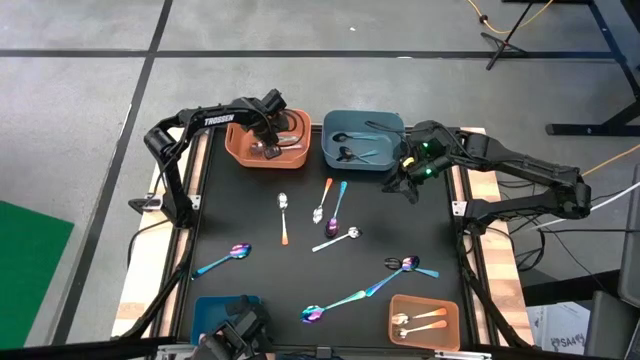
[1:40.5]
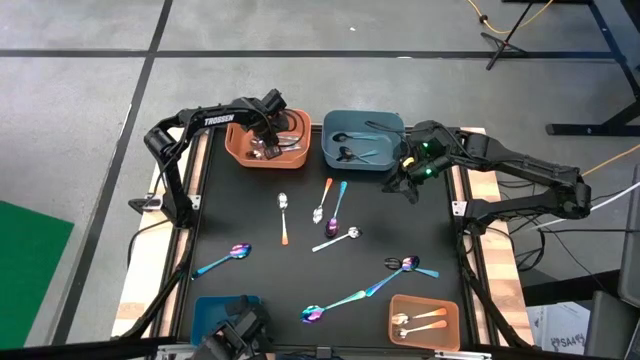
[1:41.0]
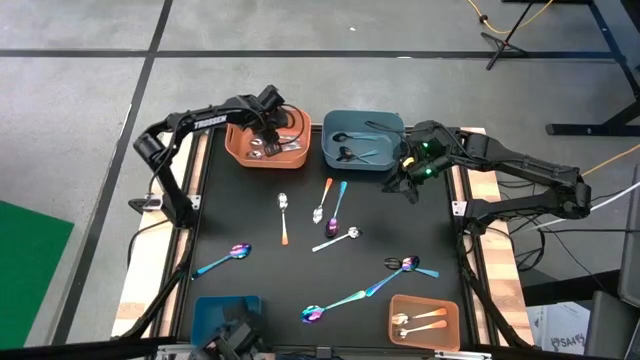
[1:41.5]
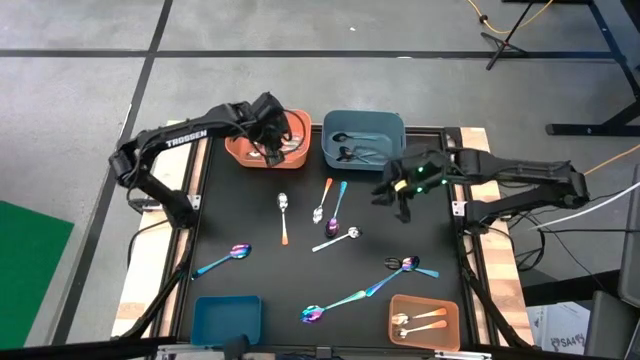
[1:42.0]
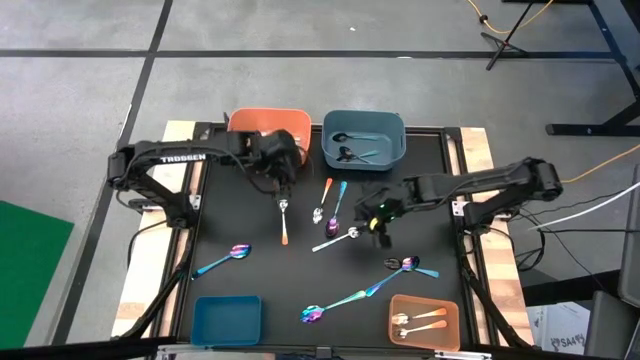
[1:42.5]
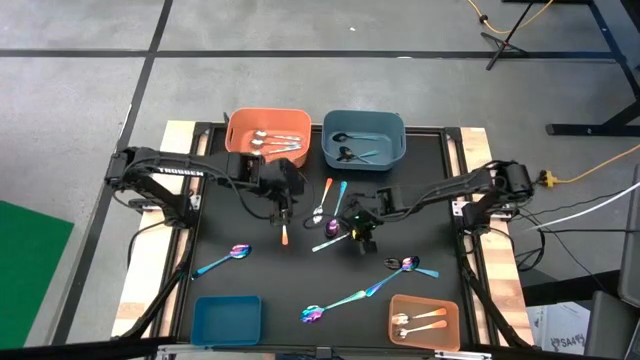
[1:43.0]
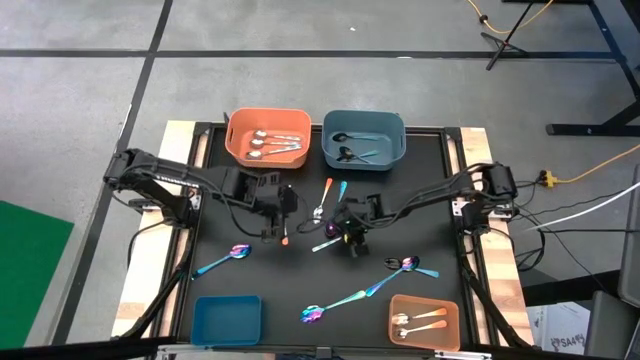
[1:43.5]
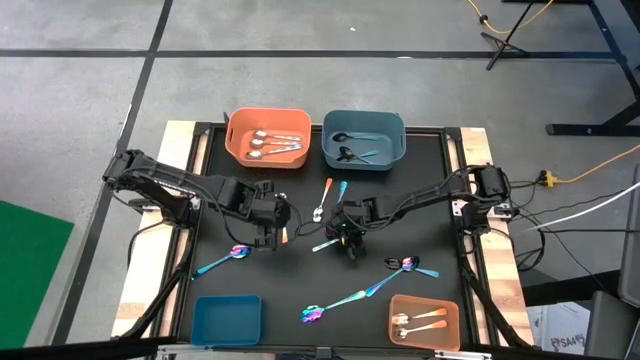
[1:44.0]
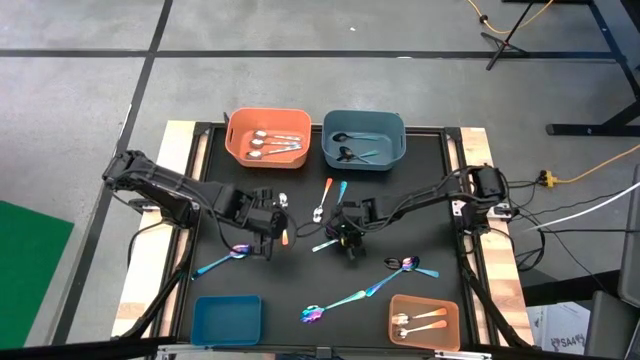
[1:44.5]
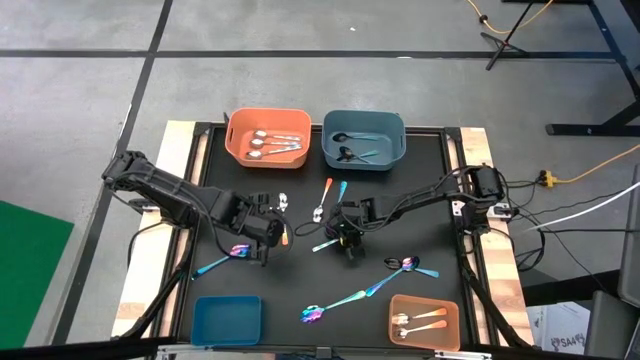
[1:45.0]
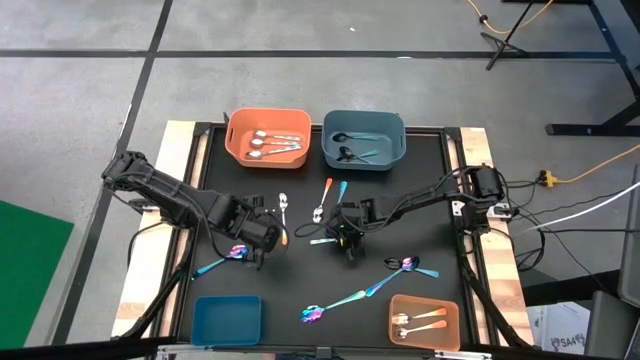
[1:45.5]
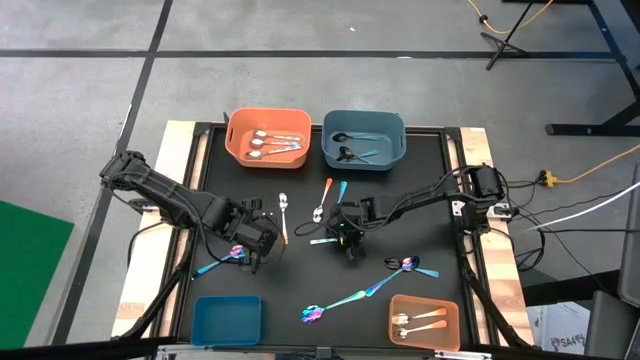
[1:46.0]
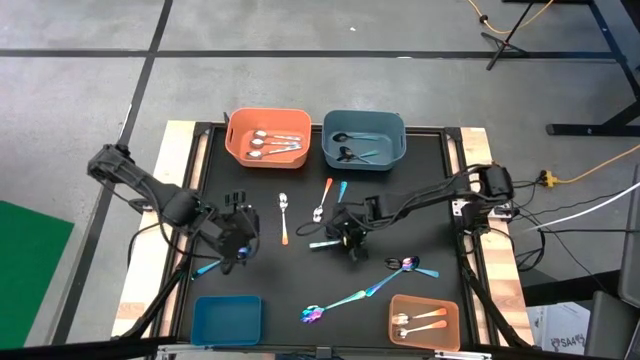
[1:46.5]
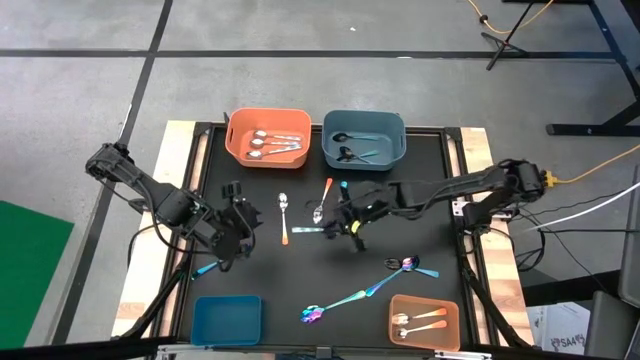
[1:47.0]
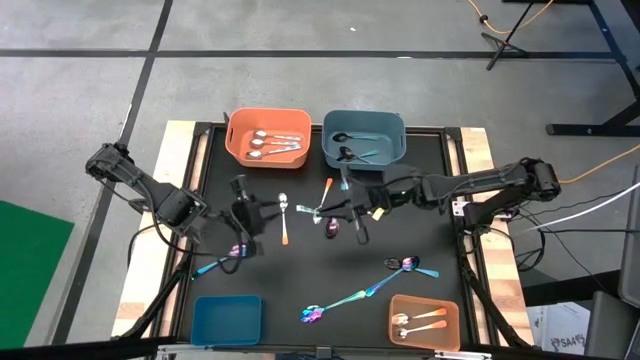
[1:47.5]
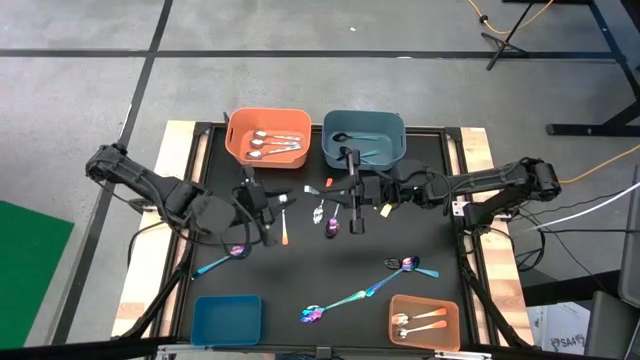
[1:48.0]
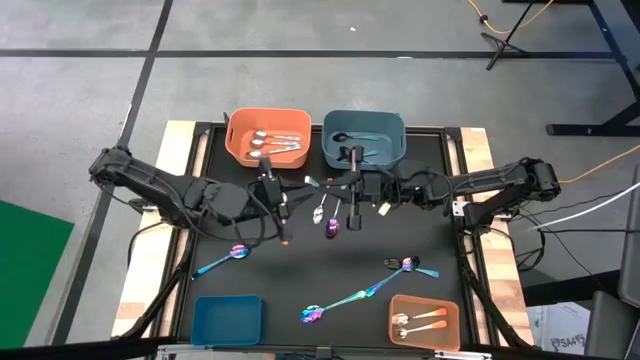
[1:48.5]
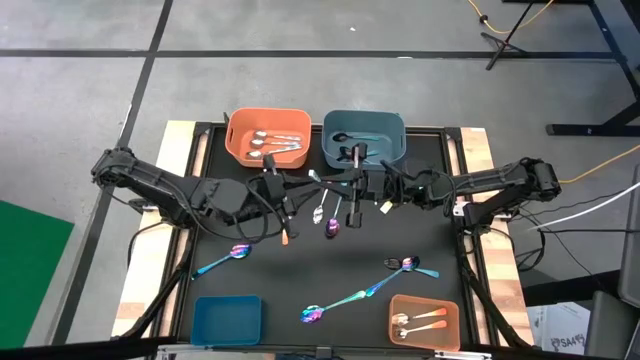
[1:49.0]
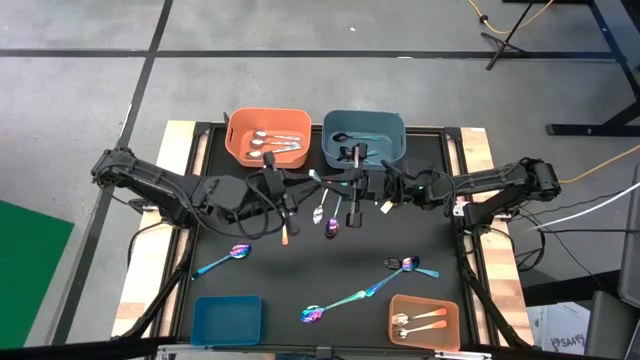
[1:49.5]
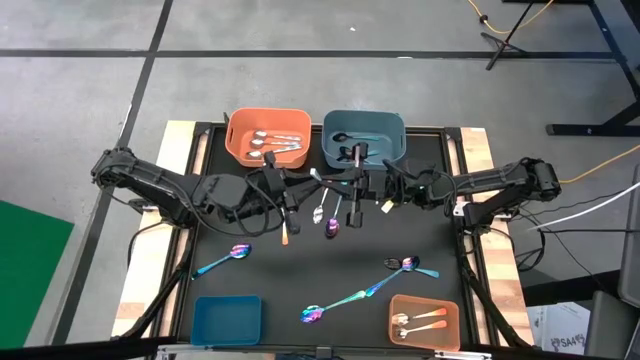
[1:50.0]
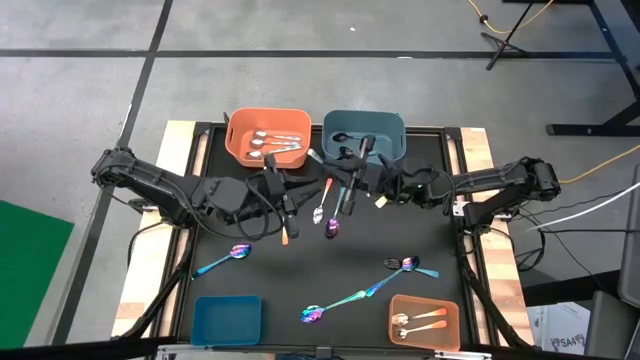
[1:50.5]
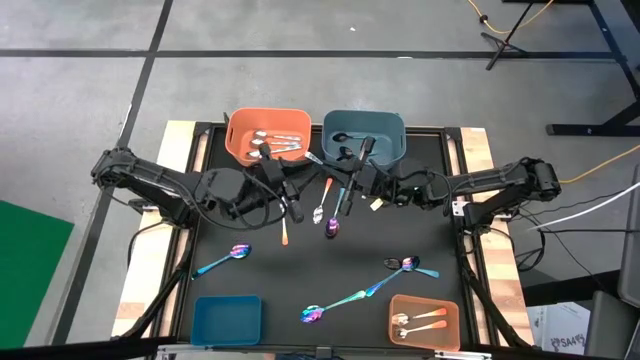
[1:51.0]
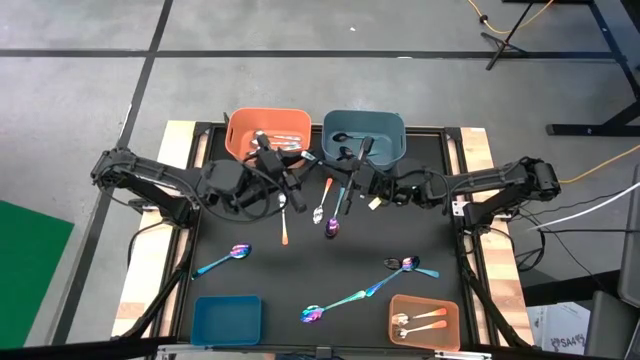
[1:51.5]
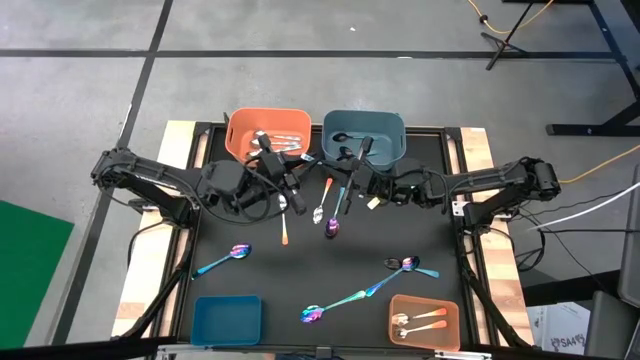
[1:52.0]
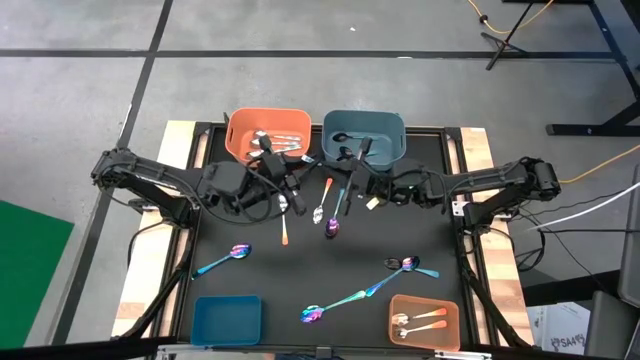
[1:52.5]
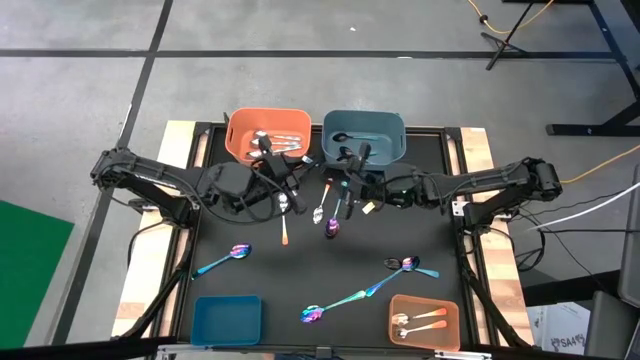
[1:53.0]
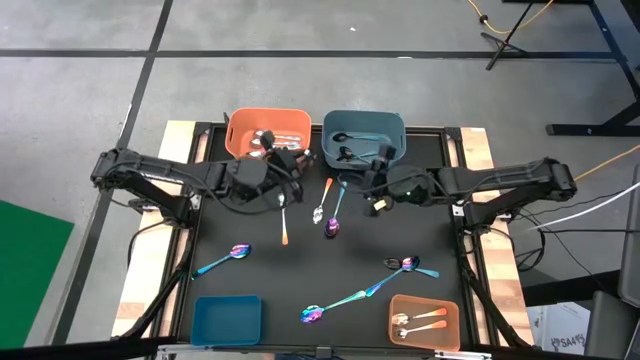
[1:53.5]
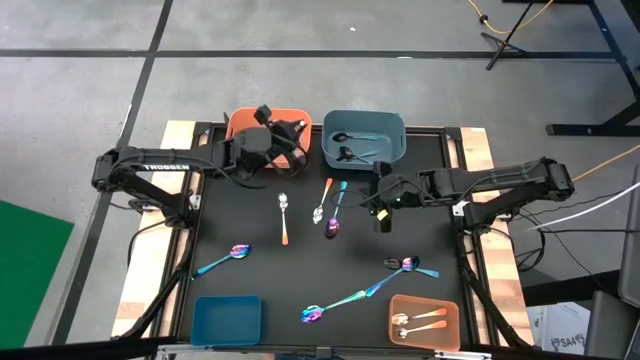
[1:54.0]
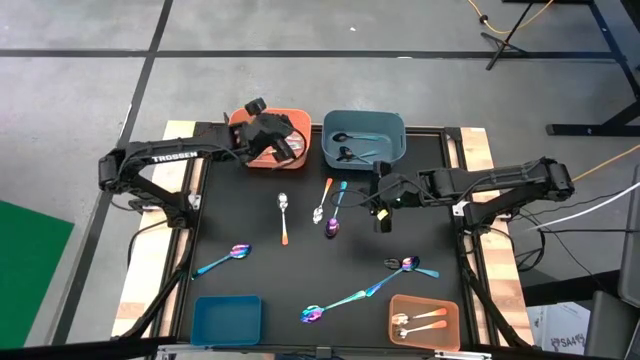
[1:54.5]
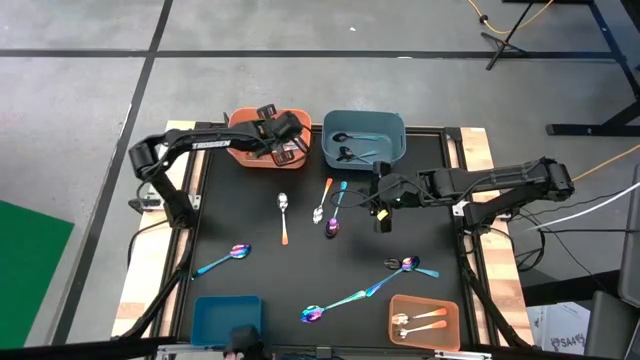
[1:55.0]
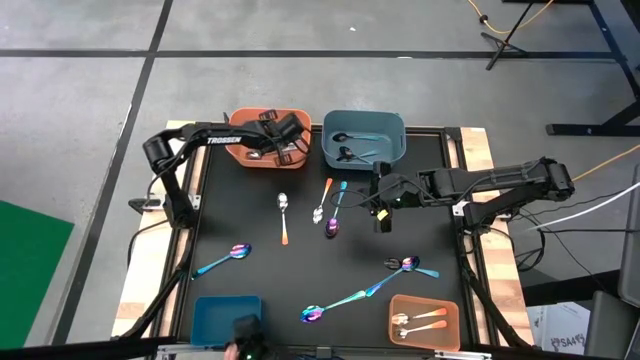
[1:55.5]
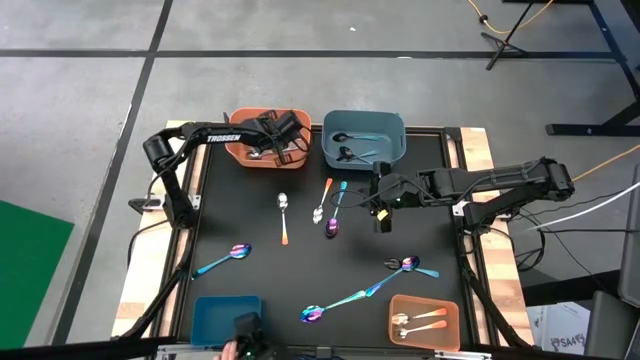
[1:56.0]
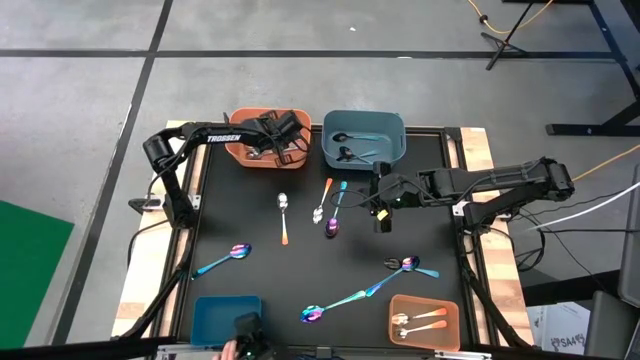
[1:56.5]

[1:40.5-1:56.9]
Task: Sort silverware by color (type)
Put the white patterned spoon into the top orange bin

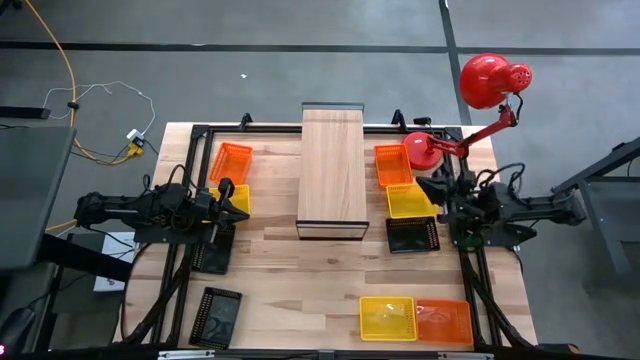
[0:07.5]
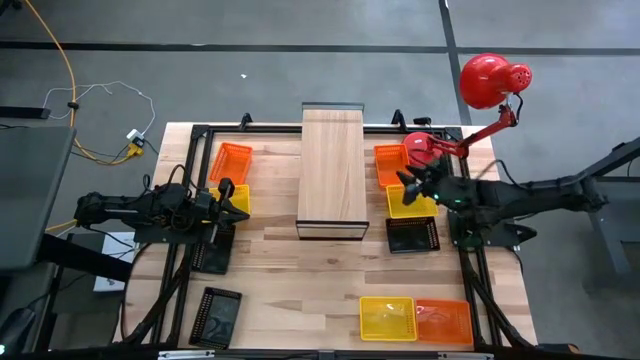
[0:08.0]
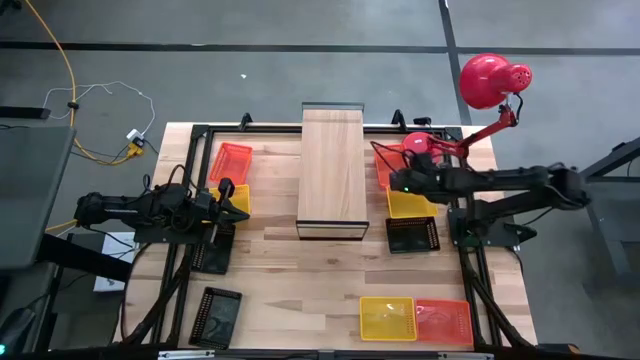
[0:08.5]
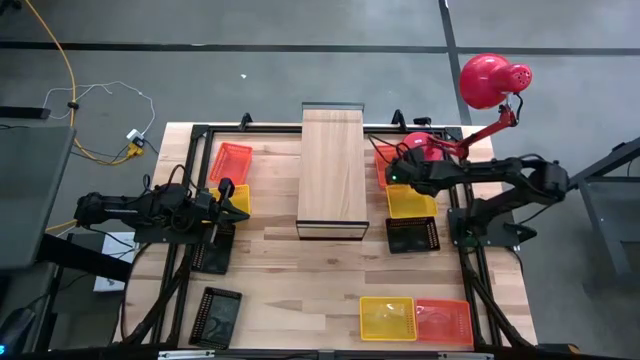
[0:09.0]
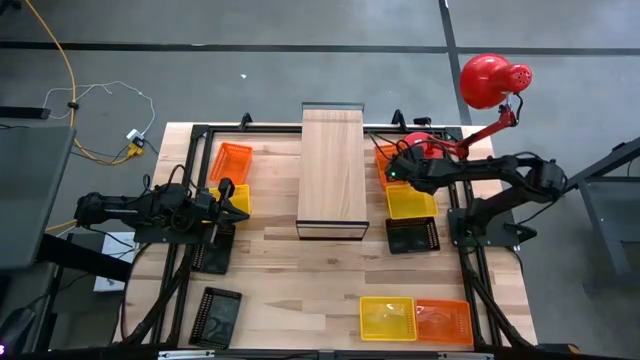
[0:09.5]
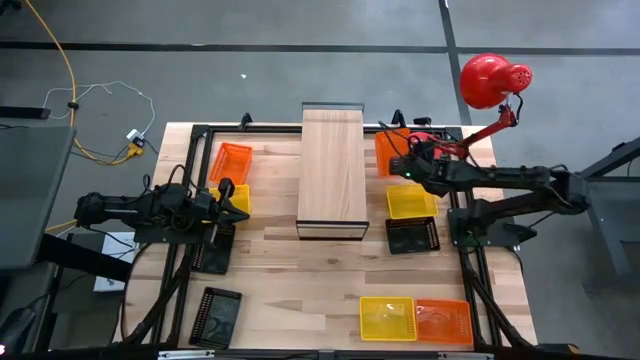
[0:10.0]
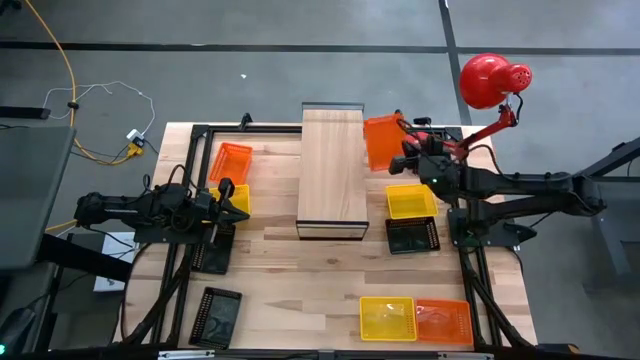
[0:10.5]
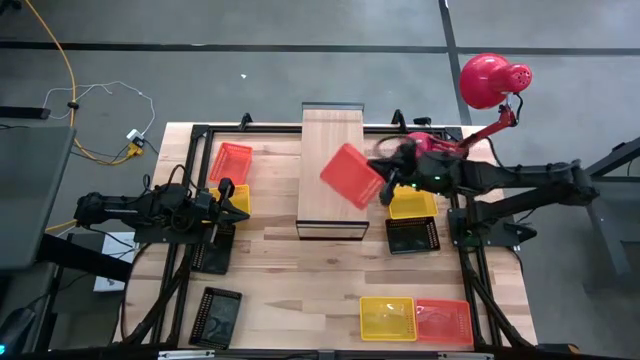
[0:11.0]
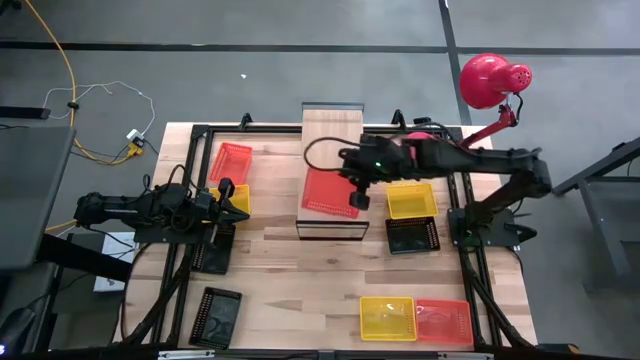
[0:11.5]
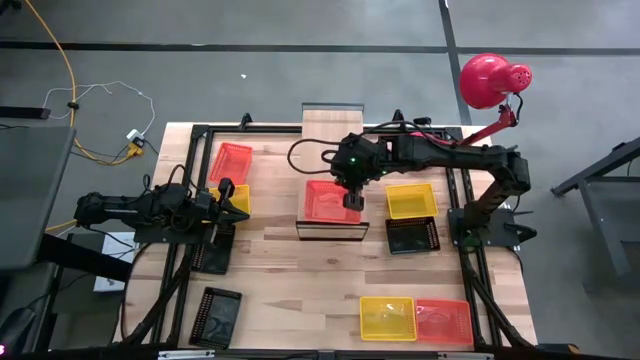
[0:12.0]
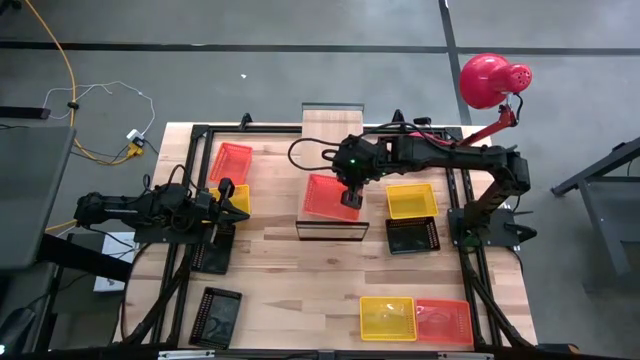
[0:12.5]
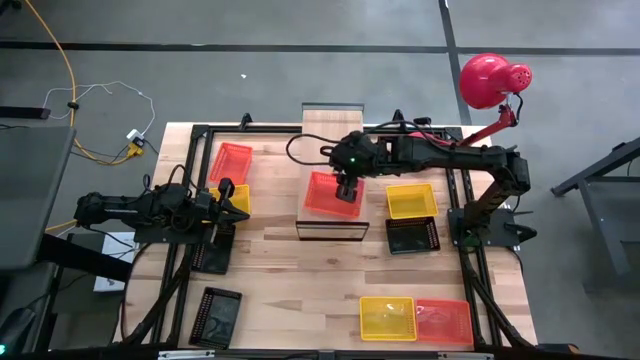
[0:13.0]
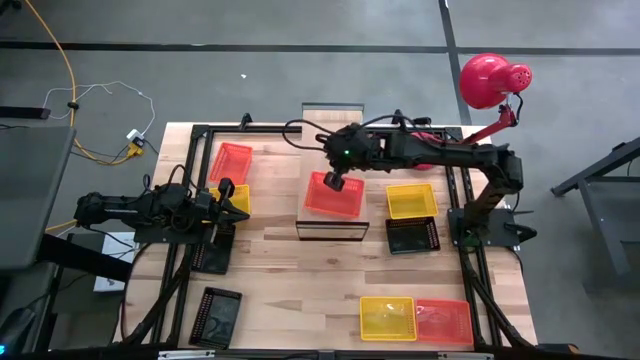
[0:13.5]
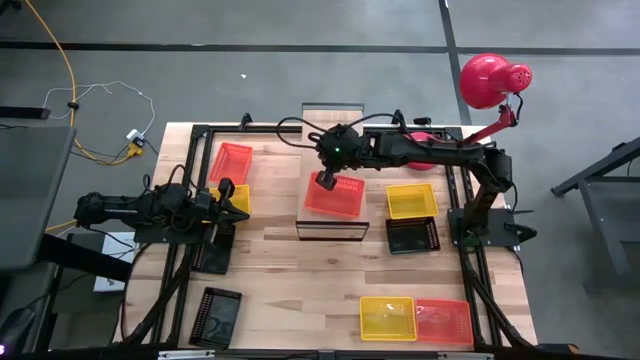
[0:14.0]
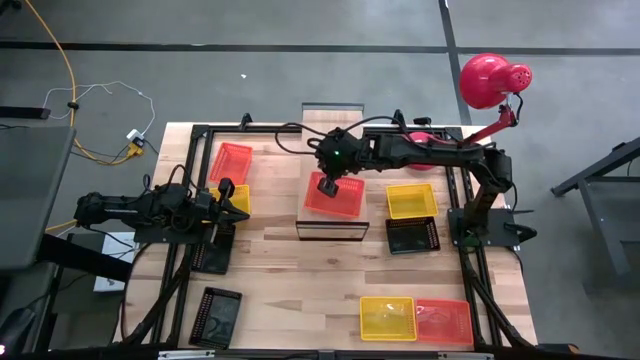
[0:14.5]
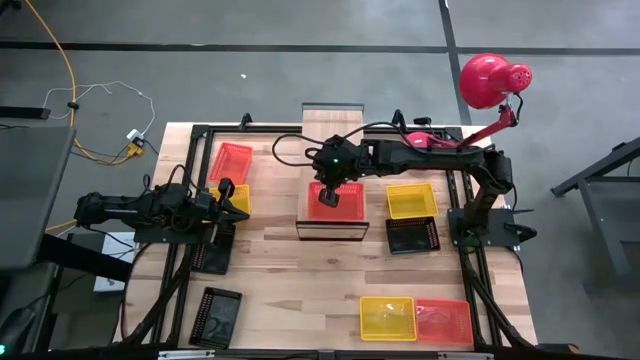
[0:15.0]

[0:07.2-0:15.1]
Task: Stack baskets on shelf by color
Put the top right orange bin on the shelf
